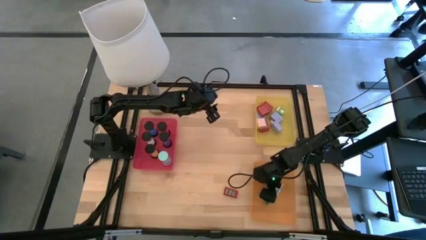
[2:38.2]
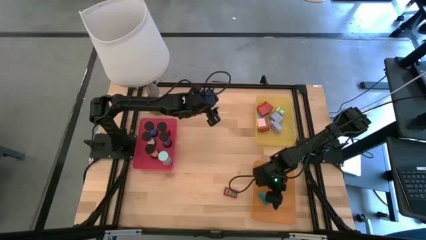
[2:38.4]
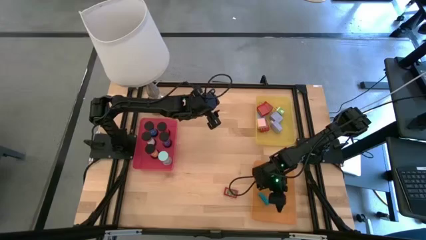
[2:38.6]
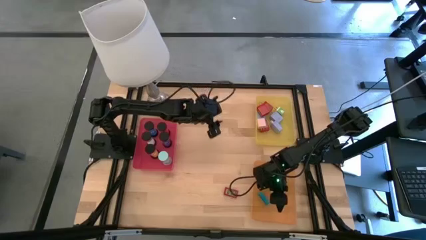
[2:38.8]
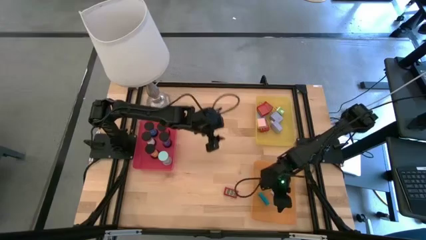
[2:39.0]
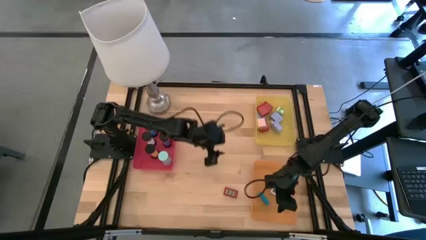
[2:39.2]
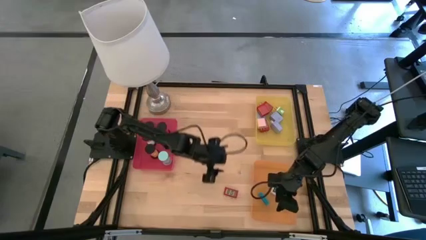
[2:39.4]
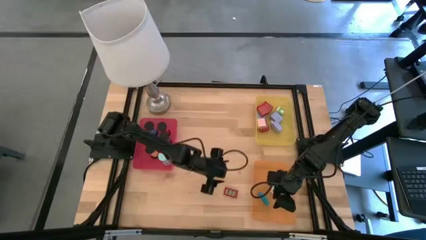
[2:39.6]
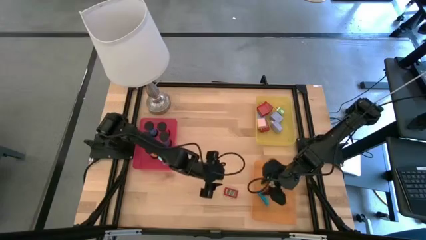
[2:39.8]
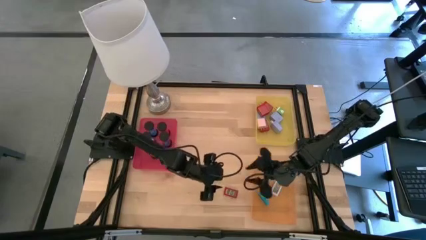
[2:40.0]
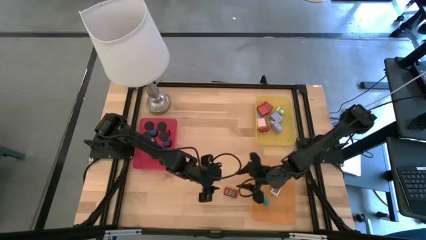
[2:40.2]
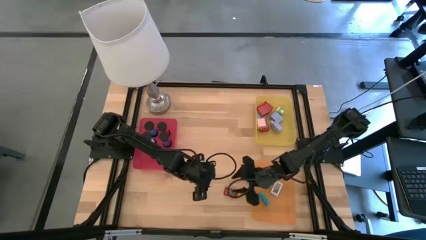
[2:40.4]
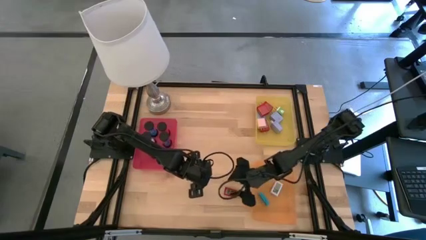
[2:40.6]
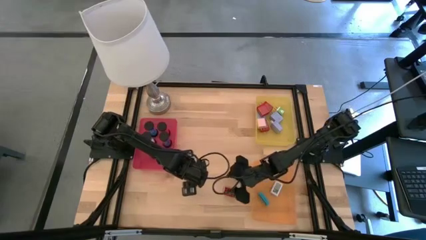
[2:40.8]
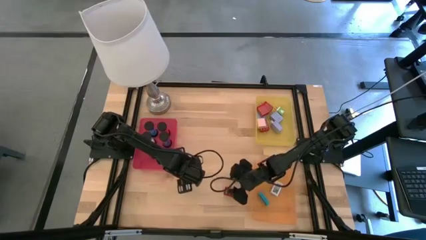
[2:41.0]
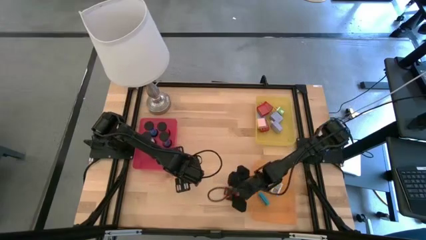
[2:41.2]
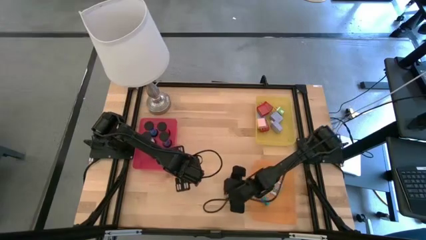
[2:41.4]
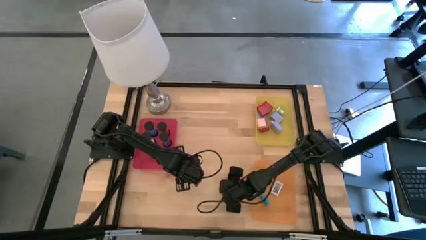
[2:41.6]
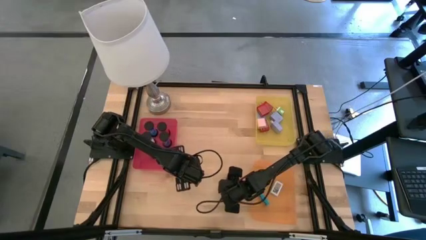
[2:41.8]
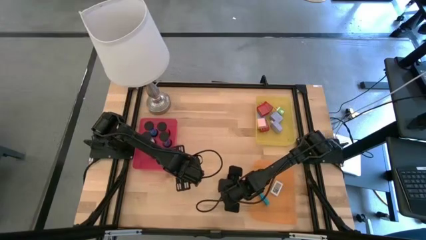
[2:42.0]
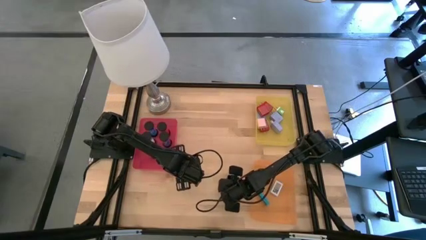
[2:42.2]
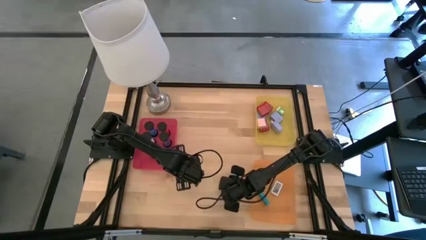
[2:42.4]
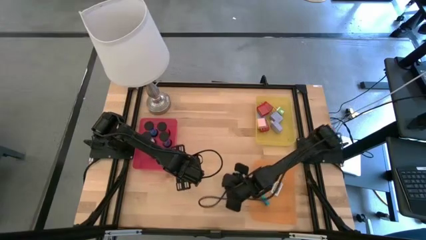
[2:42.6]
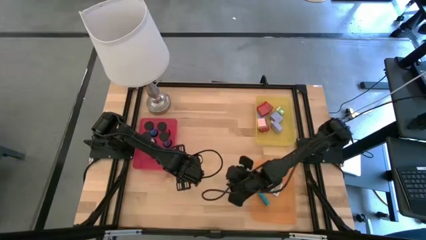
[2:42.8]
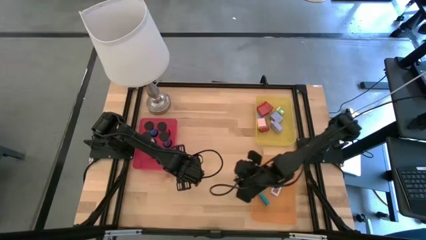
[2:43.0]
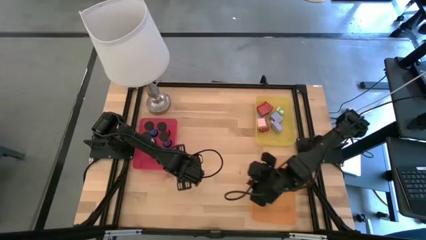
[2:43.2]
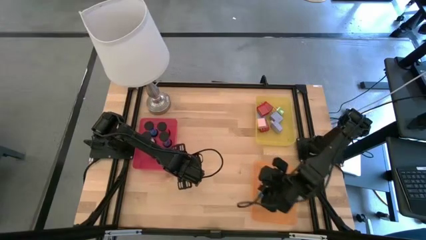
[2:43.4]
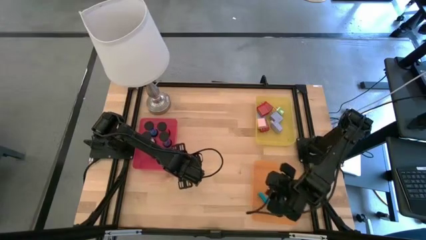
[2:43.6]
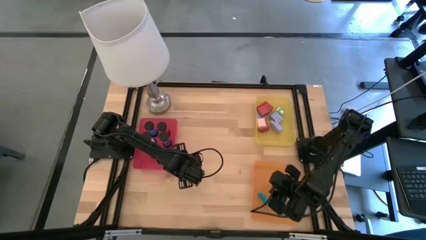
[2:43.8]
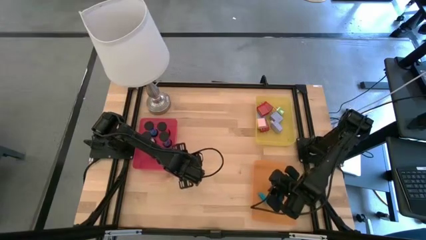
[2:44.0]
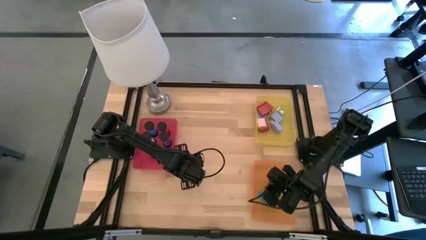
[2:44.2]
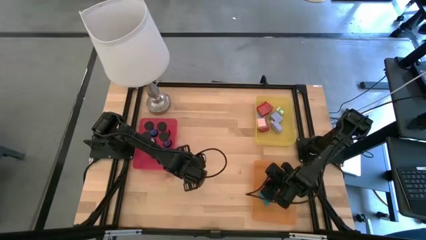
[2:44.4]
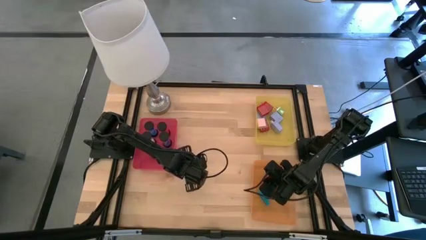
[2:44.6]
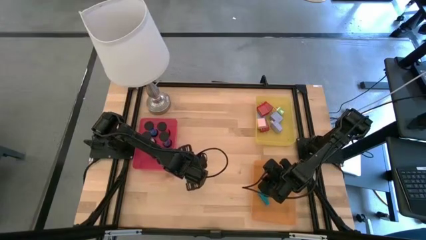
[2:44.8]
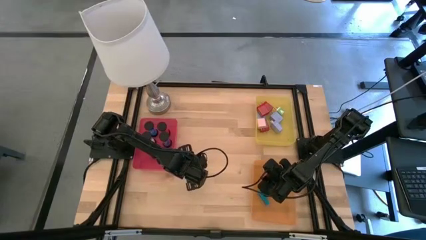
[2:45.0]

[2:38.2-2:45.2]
Task: Pick & Place Office items
Put the red digital clock into the orange bin

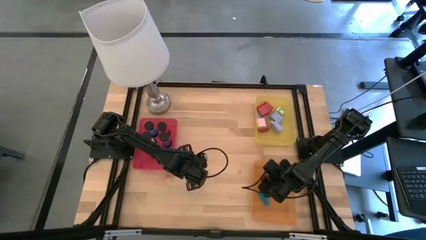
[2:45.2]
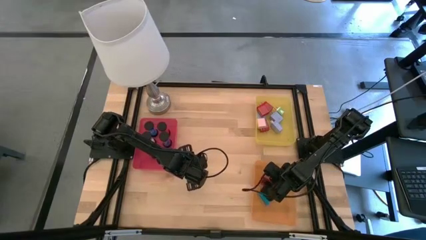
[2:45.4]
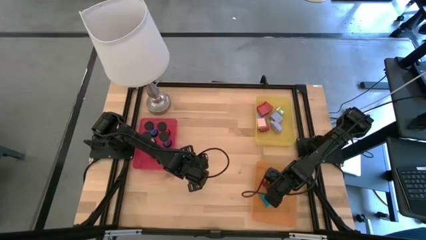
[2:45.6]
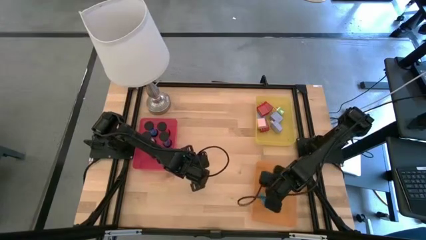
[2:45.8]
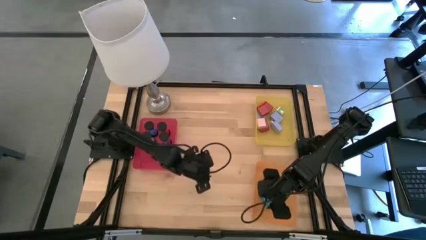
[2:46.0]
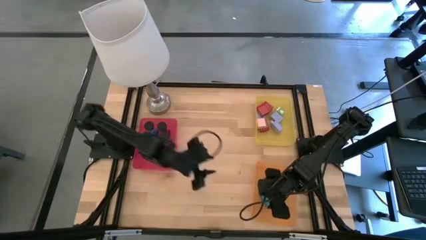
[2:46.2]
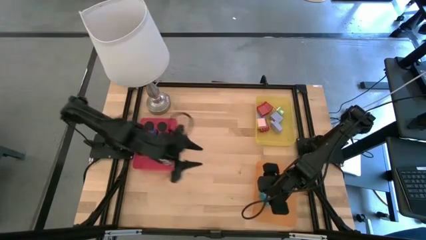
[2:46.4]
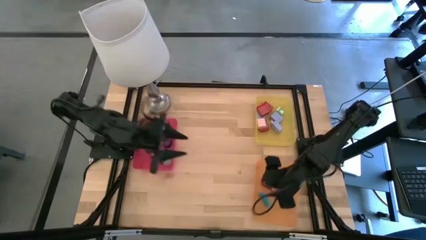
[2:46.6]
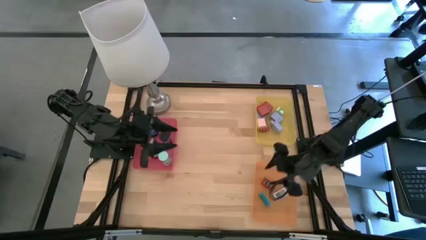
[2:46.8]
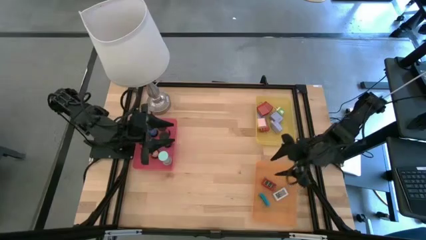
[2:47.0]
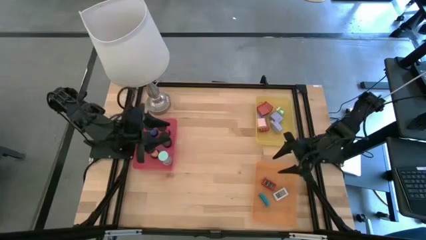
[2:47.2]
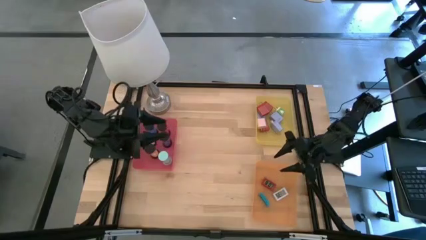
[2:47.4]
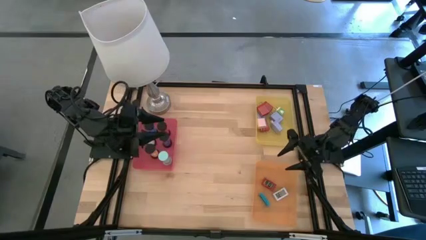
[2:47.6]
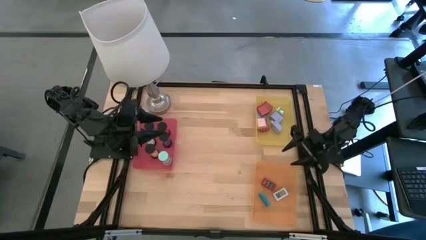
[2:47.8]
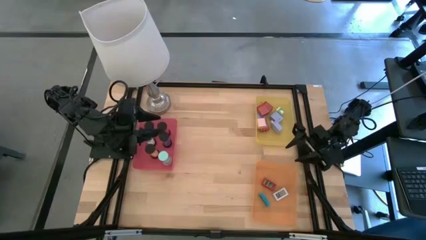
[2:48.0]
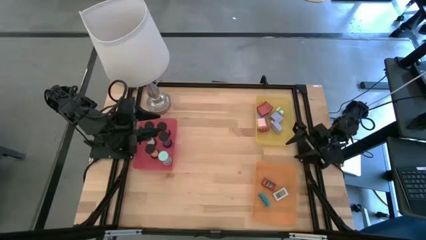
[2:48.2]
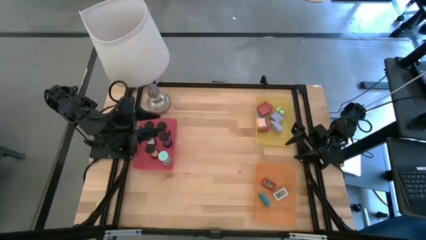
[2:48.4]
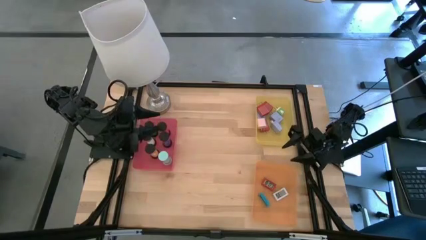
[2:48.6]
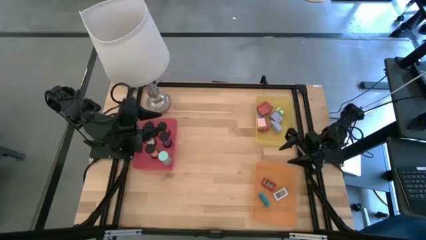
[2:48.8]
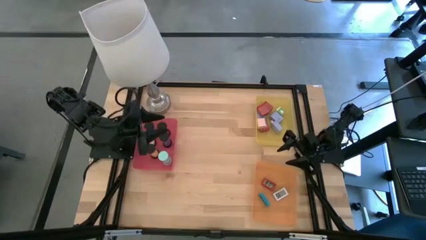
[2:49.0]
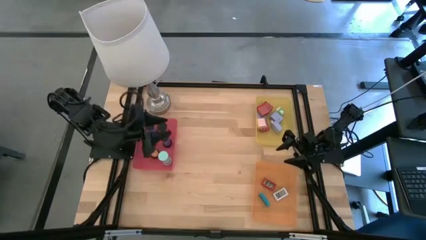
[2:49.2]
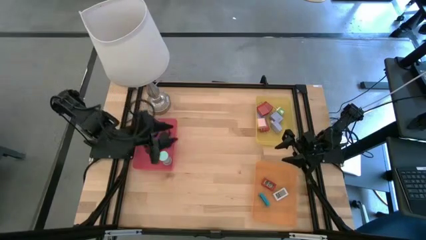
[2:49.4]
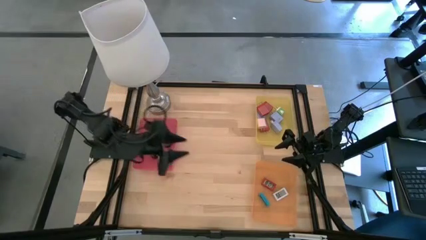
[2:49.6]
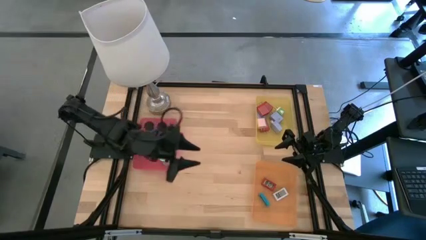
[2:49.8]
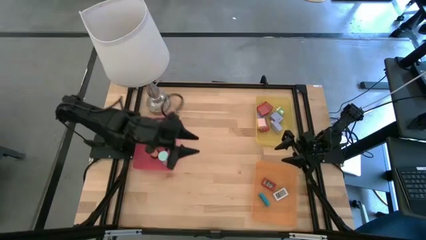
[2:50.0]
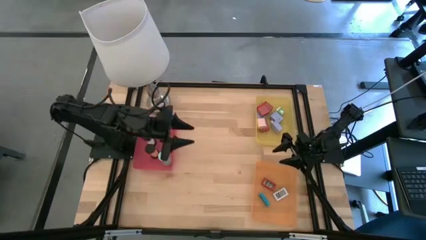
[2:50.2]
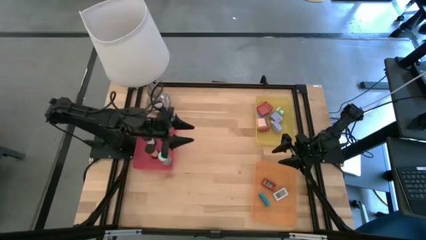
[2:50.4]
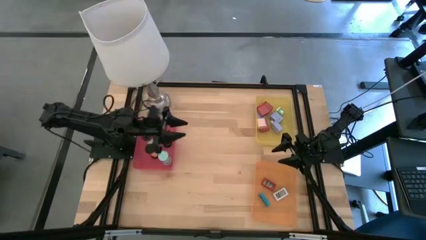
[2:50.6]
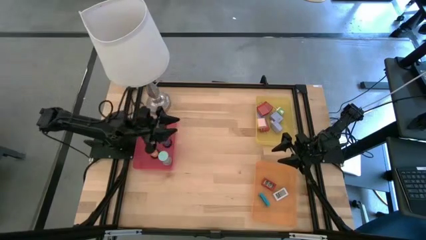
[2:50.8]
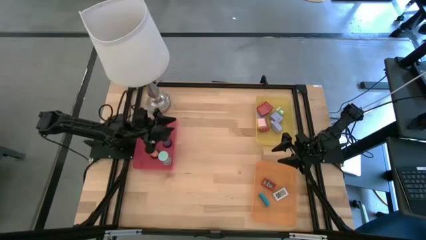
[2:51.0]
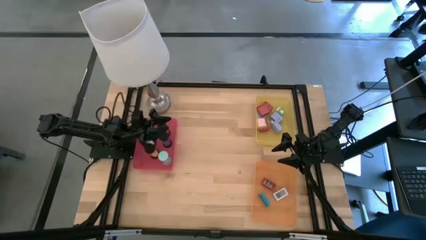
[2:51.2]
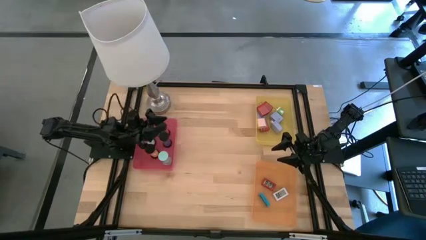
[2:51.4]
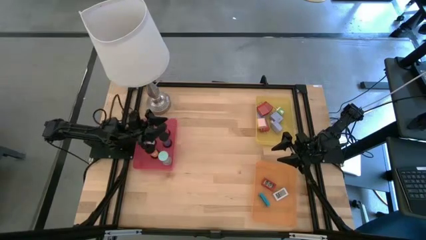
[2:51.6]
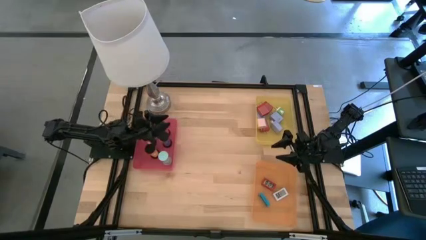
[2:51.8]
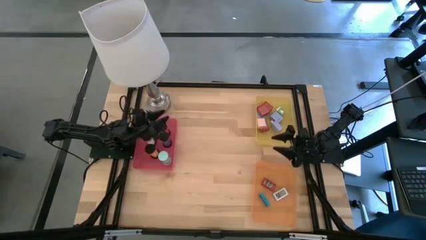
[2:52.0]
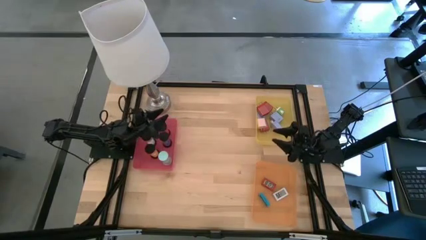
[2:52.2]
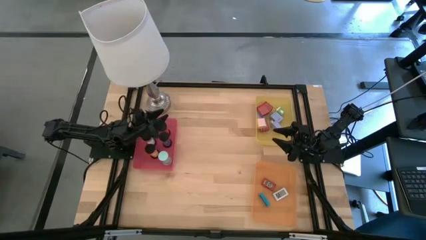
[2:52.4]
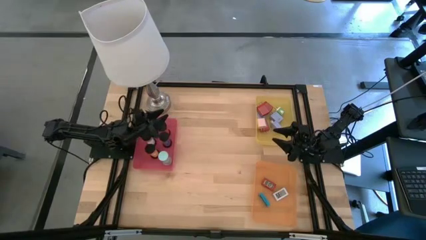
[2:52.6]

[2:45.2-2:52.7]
Return to Home Position
